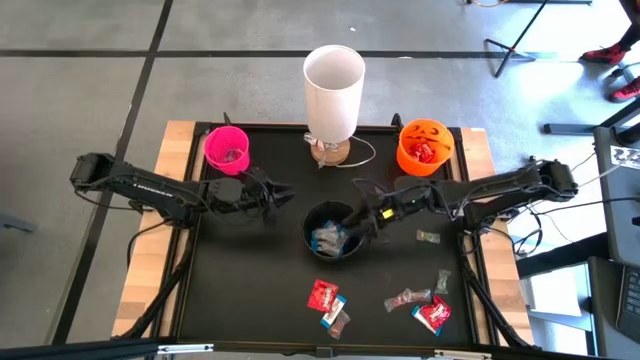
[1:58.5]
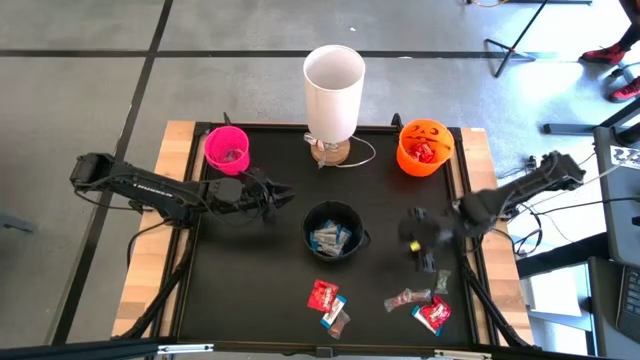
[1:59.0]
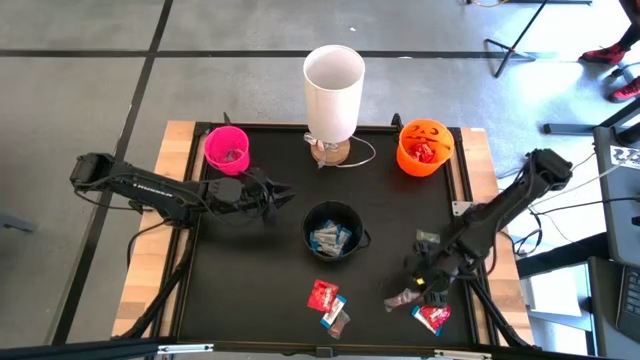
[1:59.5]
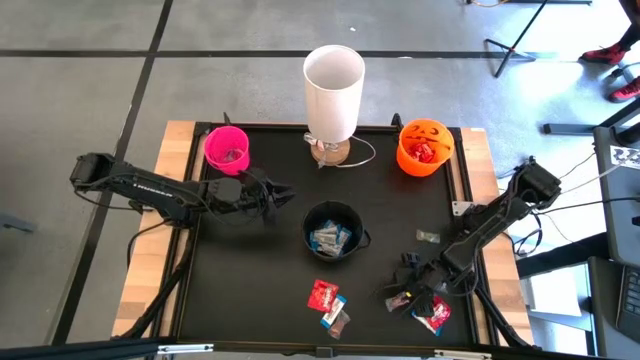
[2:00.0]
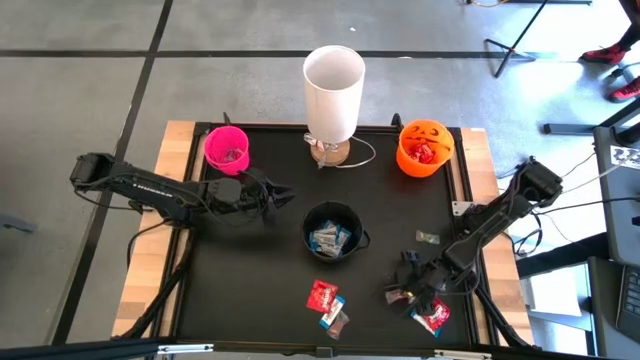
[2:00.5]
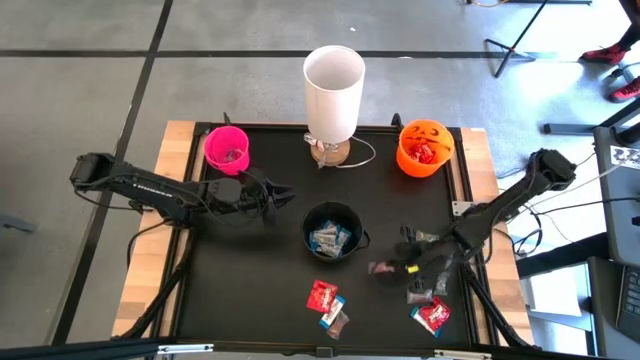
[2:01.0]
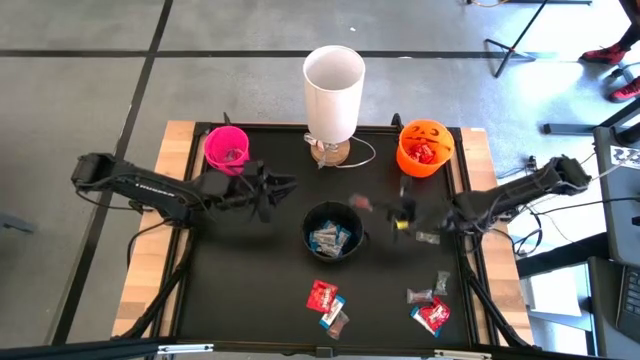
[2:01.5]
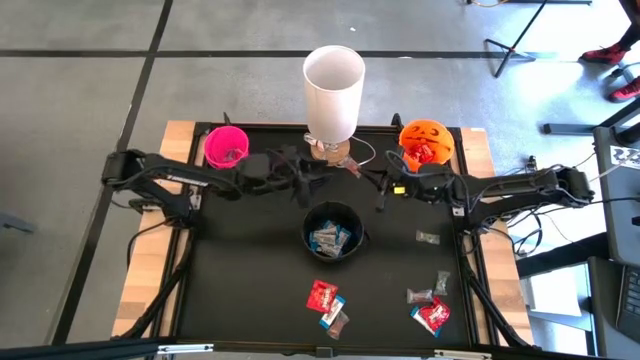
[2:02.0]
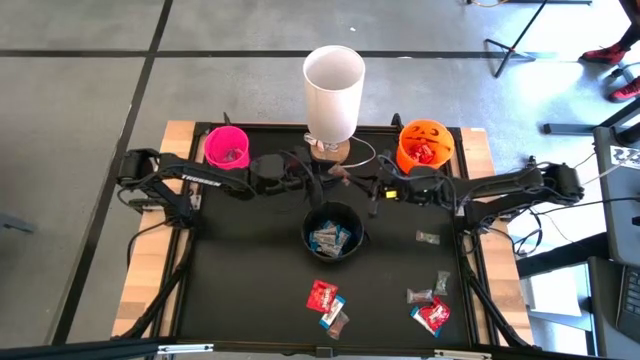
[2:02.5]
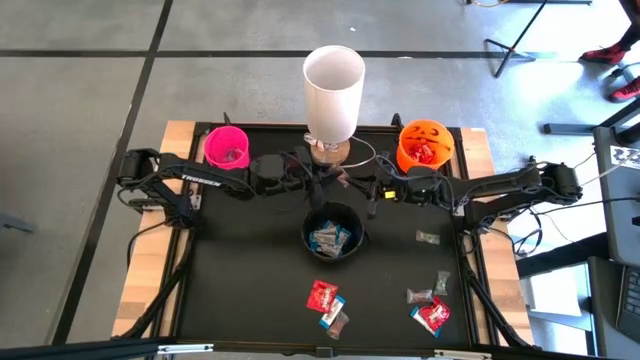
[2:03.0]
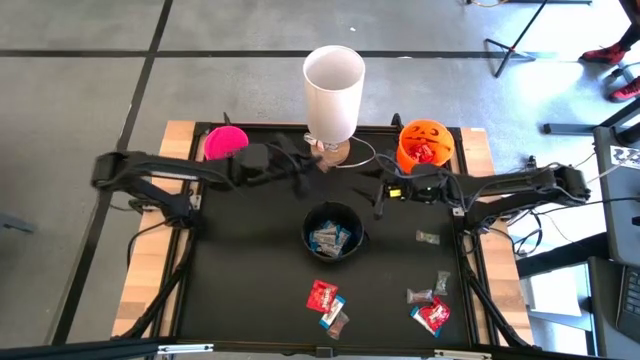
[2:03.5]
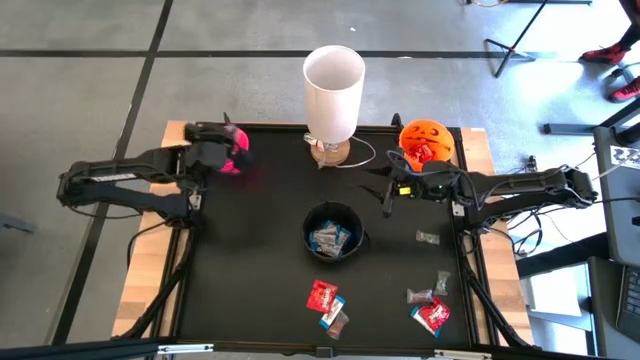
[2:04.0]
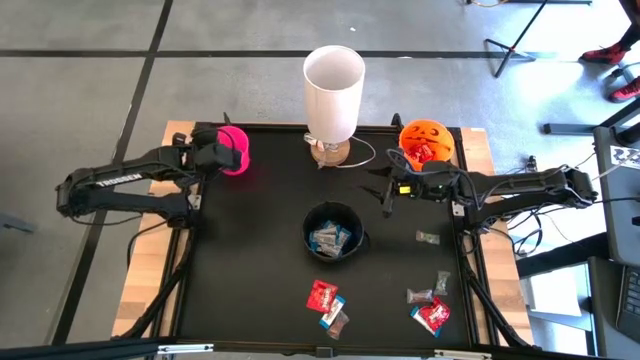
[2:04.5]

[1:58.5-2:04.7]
Task: Sort candy
Put the orange gummy into the black bucket

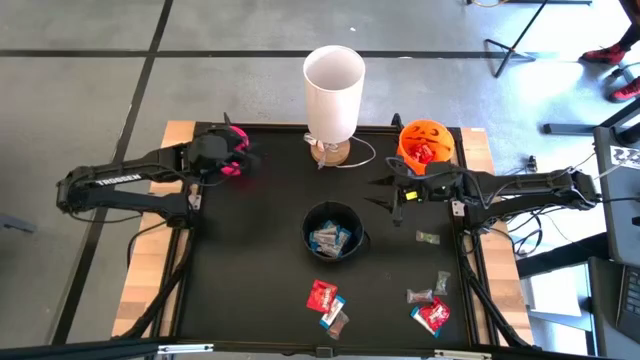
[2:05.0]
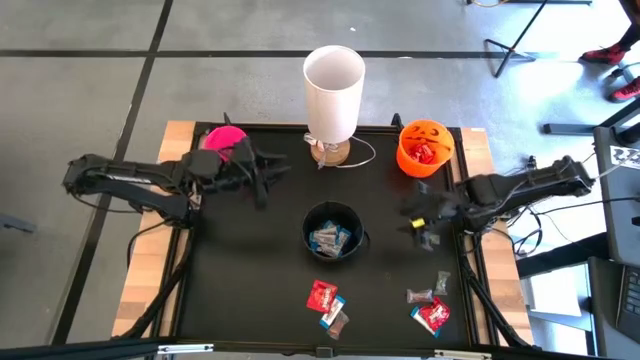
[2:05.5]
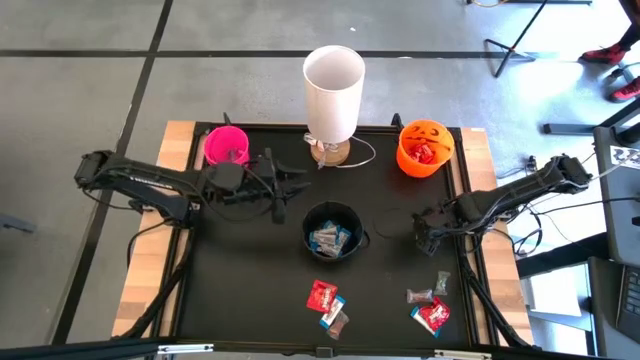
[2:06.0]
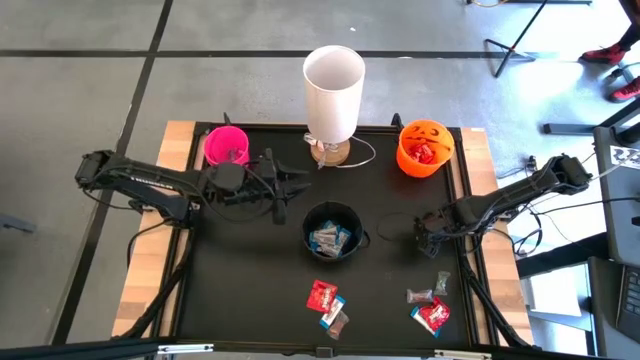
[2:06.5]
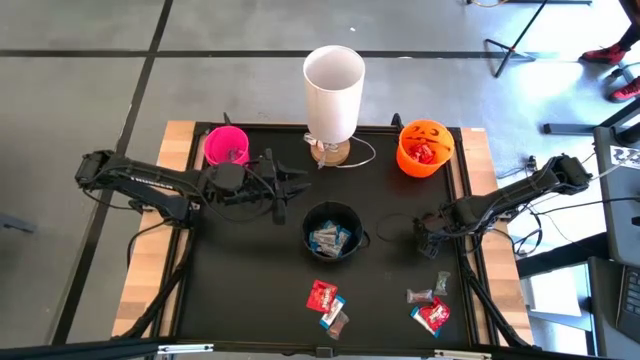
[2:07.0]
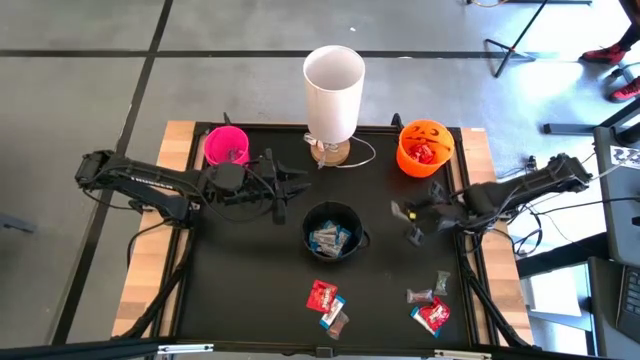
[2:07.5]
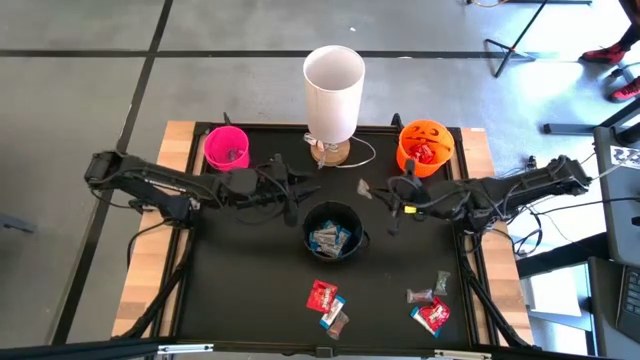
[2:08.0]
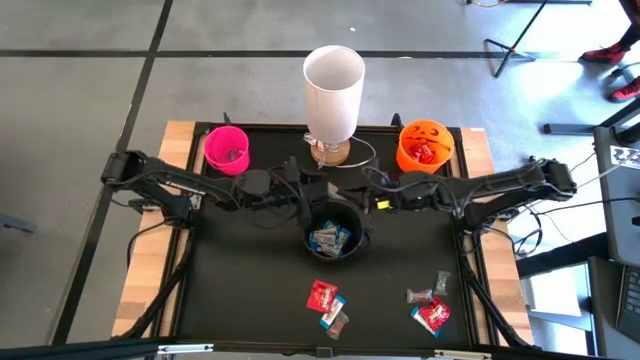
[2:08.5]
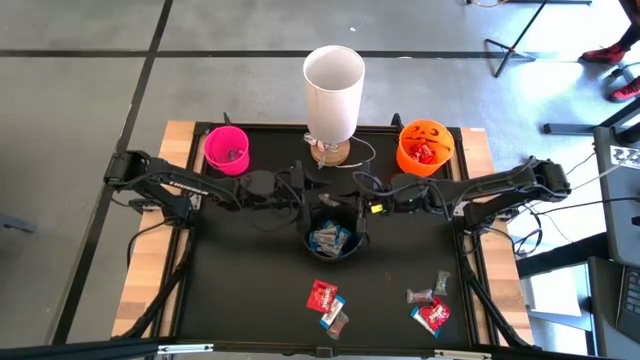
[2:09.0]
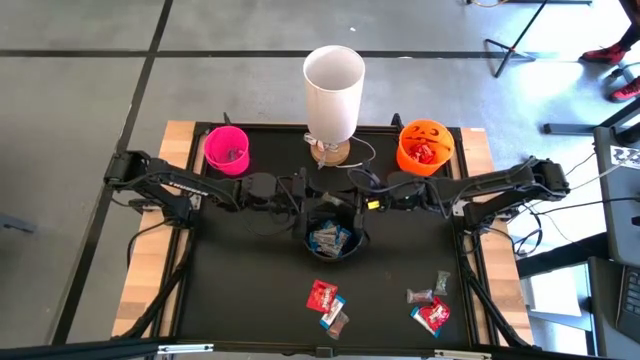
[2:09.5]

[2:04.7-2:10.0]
Put the green gummy into the pink bucket

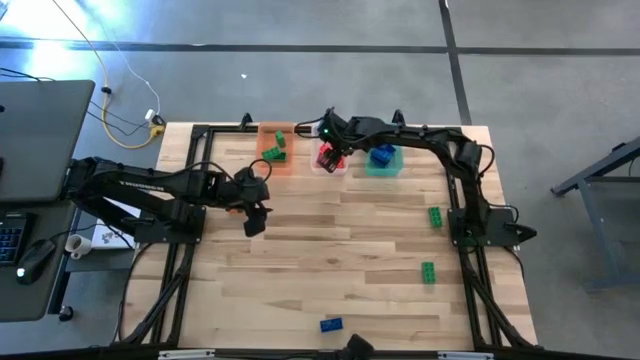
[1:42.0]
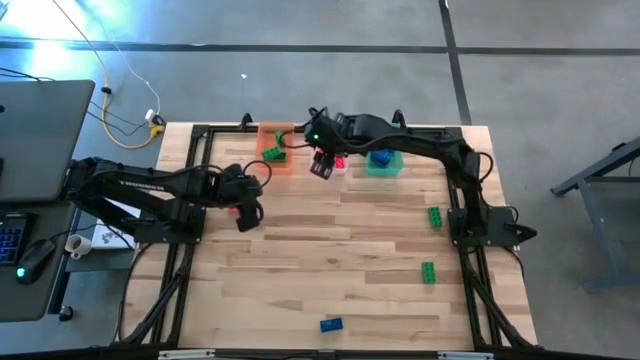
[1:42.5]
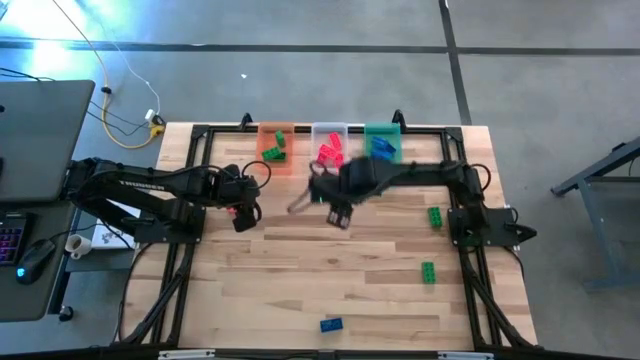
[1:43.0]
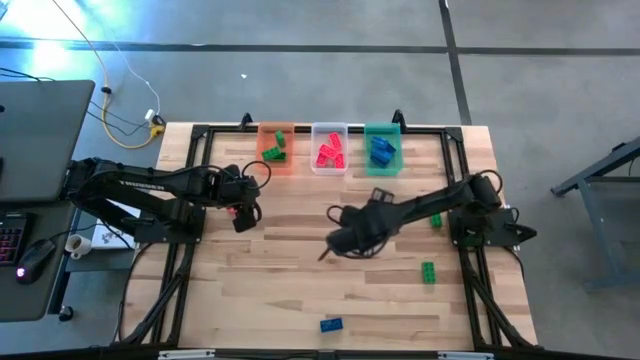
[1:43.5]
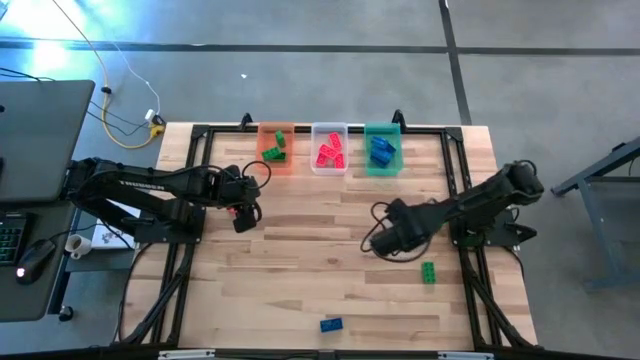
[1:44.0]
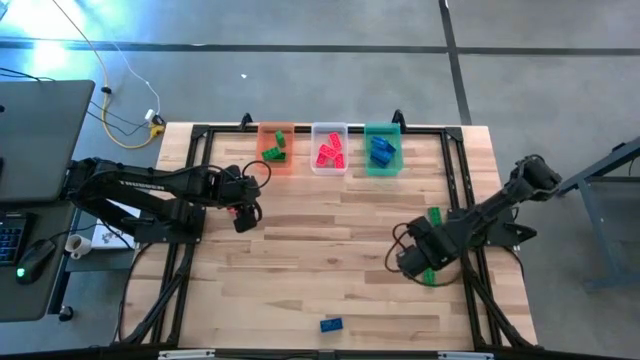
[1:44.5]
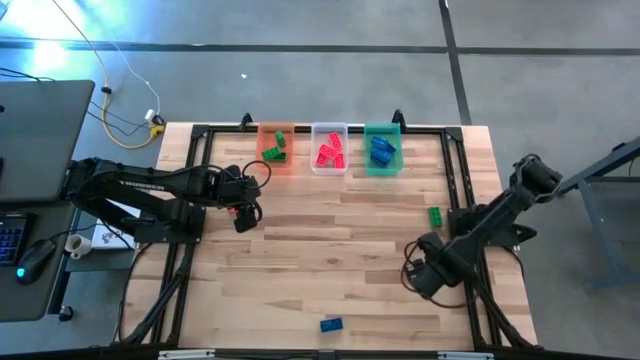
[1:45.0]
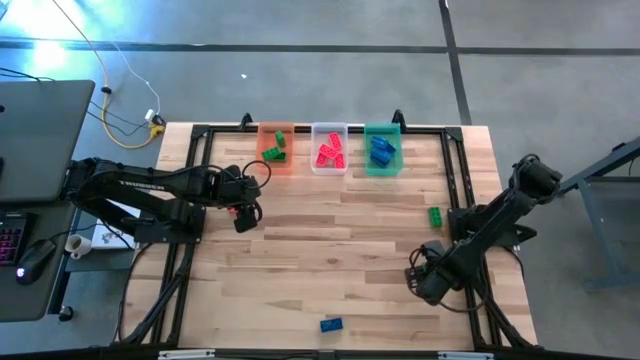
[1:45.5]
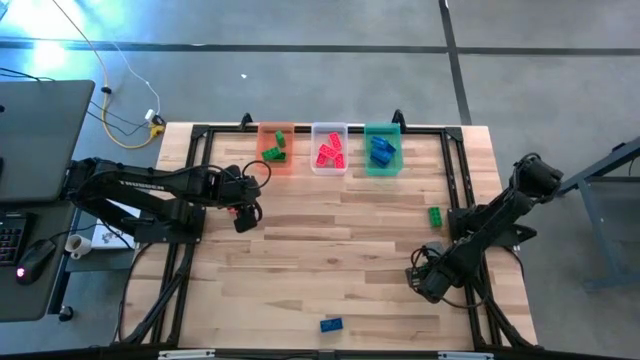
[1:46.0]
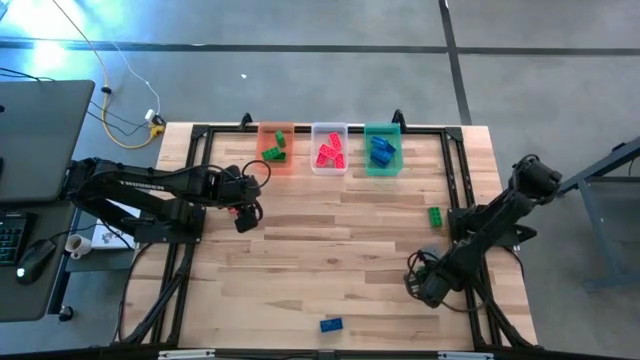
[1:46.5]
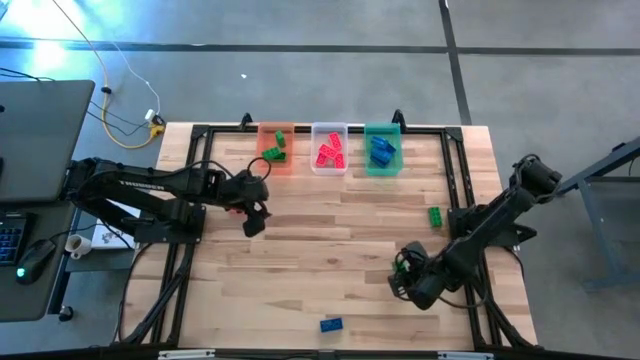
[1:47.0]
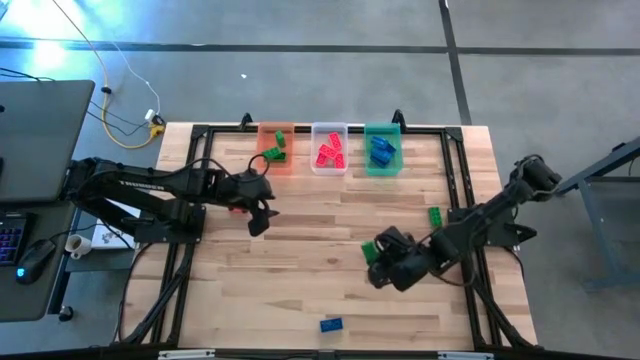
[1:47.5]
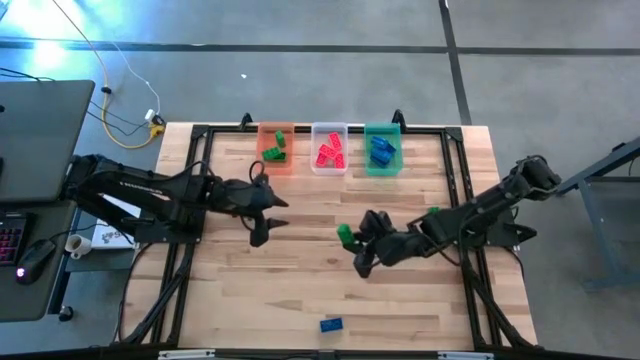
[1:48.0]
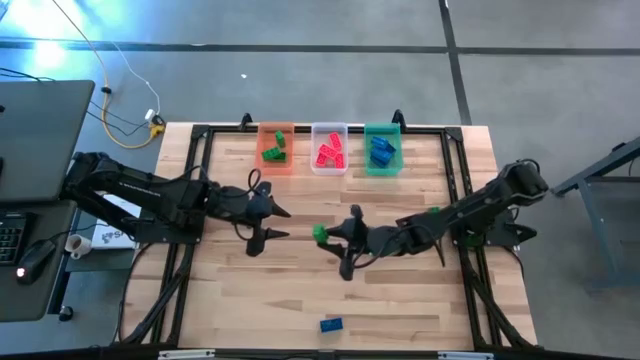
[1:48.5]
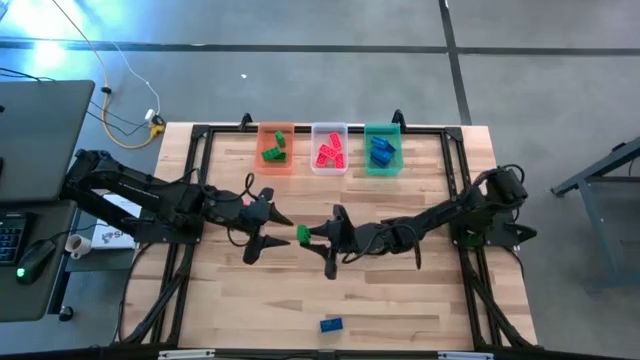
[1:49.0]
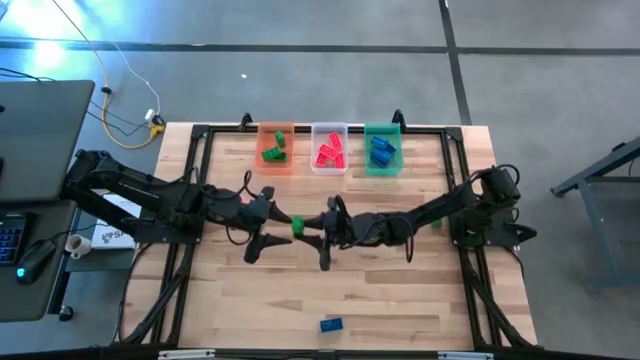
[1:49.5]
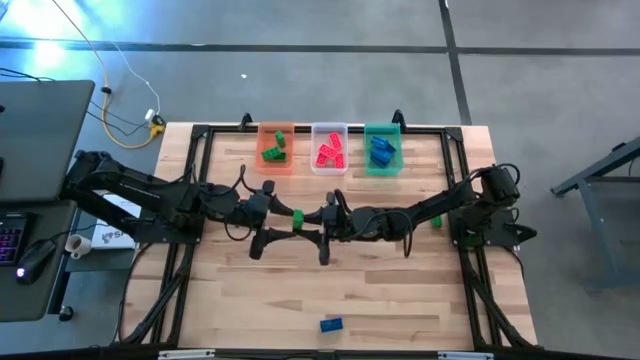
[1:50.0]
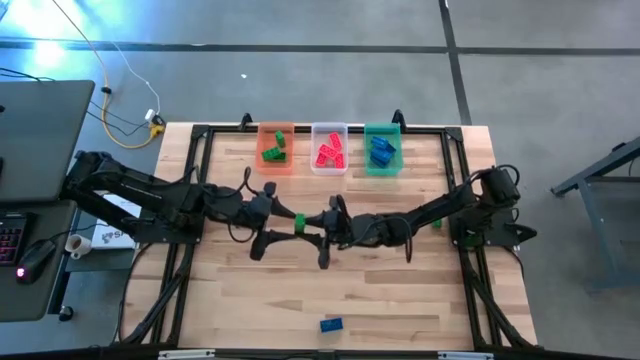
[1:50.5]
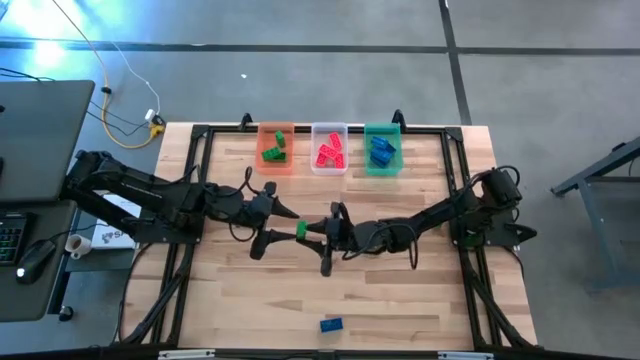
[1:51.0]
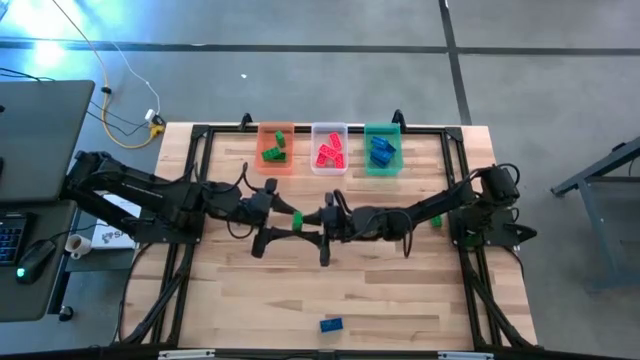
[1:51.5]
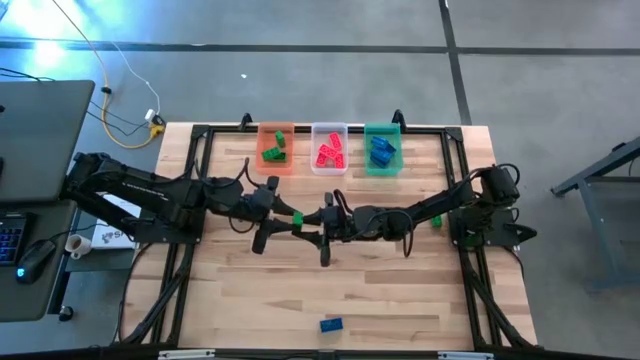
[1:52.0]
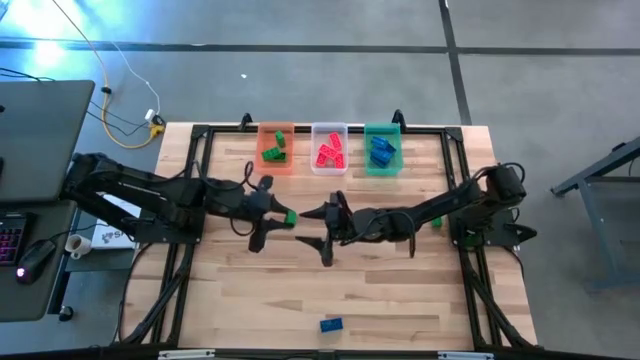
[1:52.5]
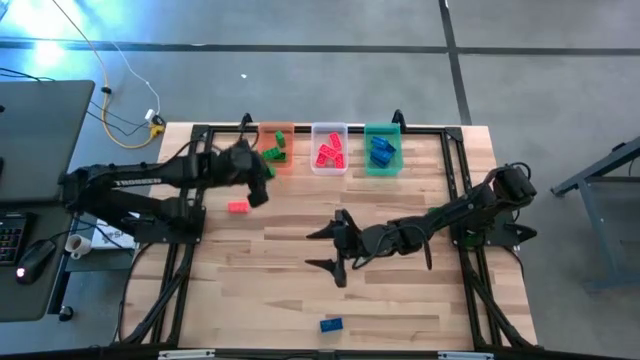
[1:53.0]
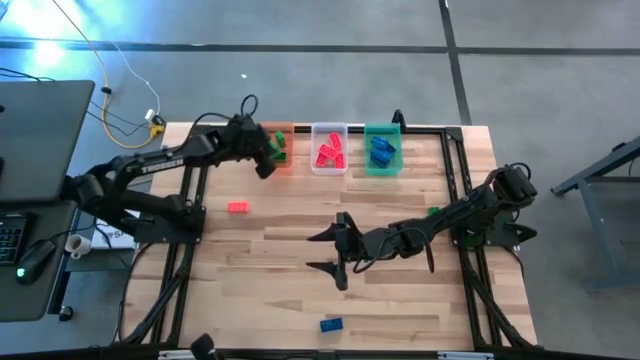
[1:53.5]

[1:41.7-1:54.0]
Task: Sort & place blocks by color
Put the green game piece into the orange bin
